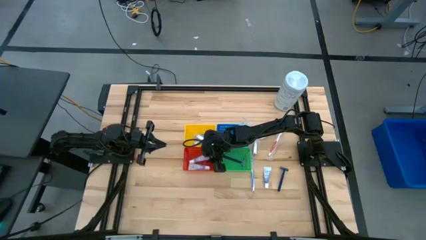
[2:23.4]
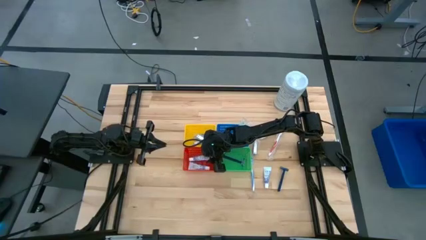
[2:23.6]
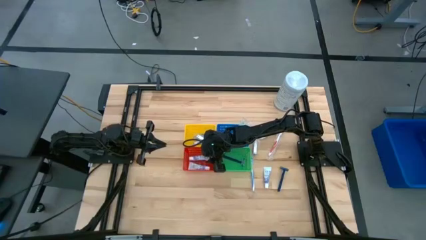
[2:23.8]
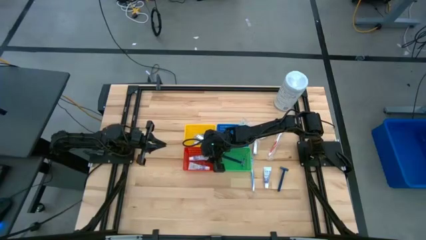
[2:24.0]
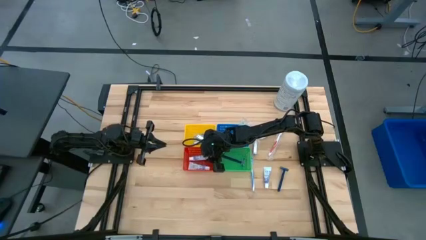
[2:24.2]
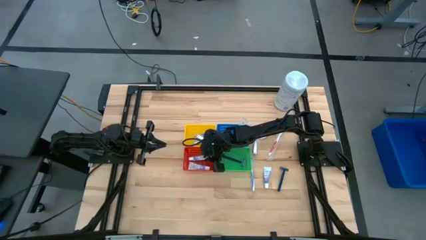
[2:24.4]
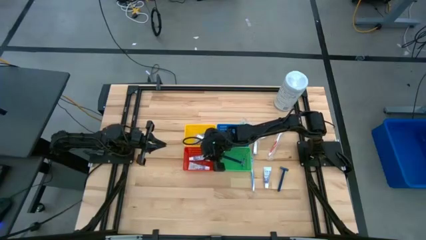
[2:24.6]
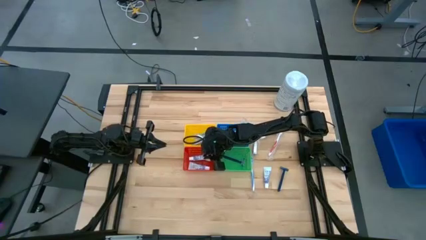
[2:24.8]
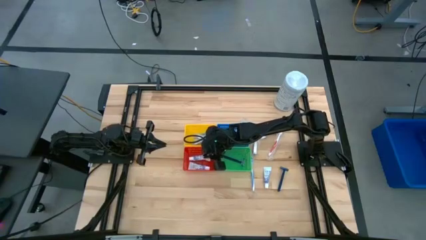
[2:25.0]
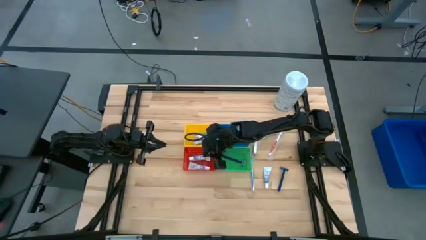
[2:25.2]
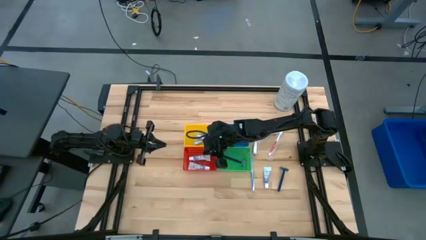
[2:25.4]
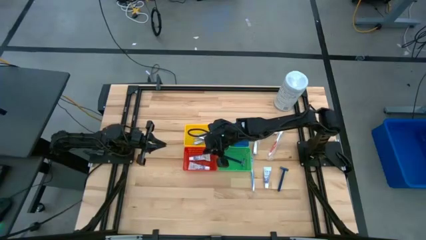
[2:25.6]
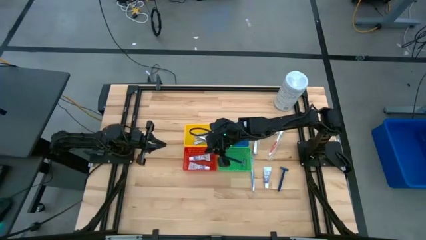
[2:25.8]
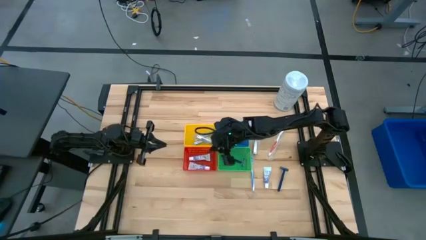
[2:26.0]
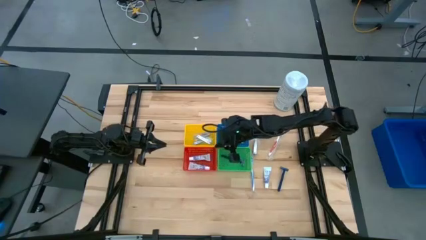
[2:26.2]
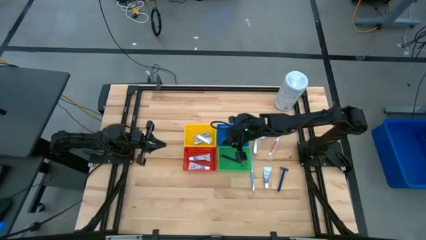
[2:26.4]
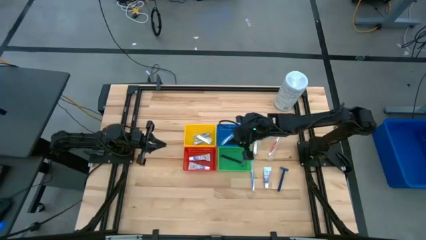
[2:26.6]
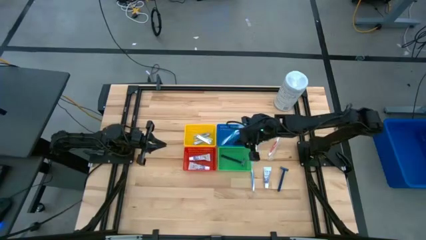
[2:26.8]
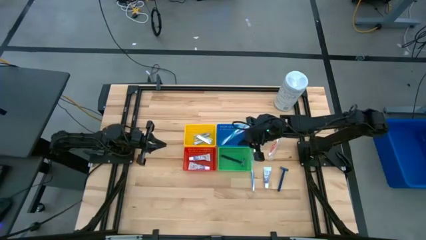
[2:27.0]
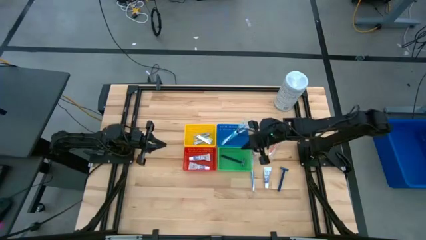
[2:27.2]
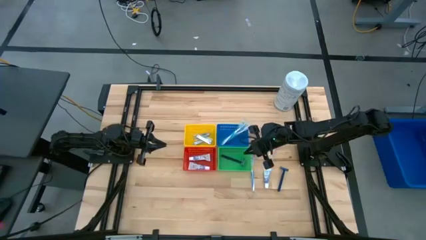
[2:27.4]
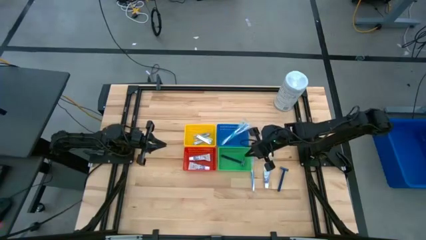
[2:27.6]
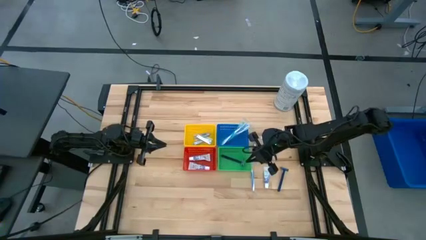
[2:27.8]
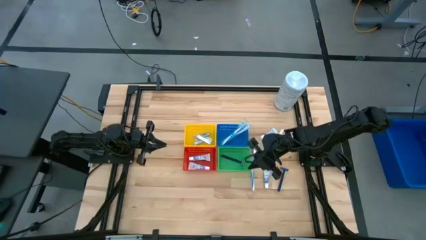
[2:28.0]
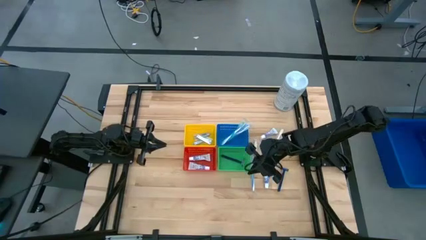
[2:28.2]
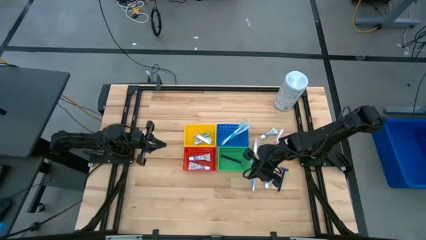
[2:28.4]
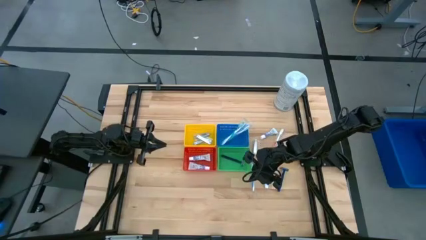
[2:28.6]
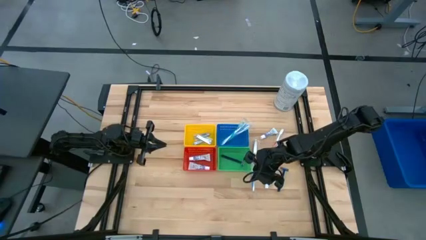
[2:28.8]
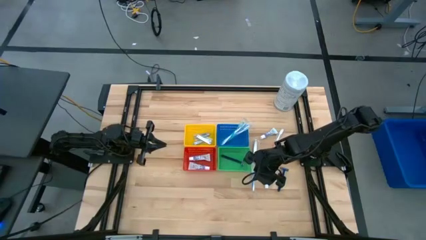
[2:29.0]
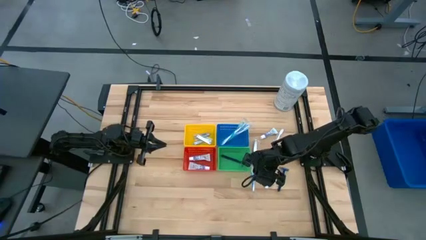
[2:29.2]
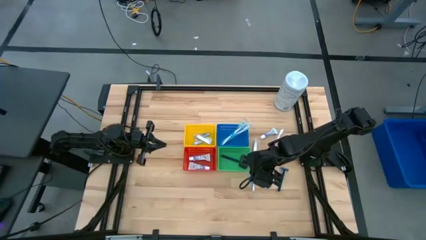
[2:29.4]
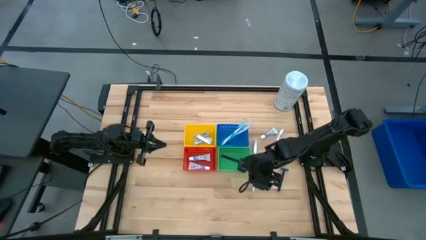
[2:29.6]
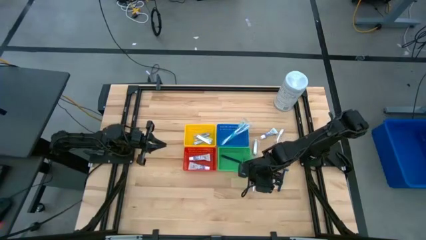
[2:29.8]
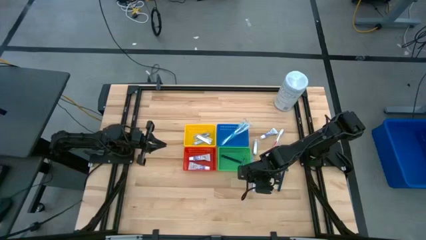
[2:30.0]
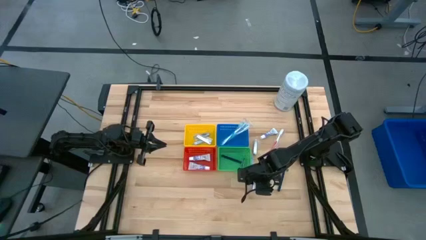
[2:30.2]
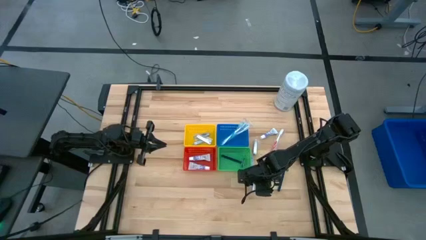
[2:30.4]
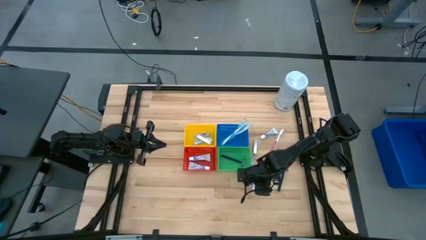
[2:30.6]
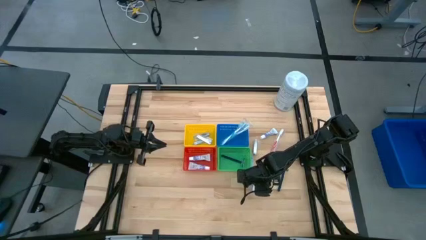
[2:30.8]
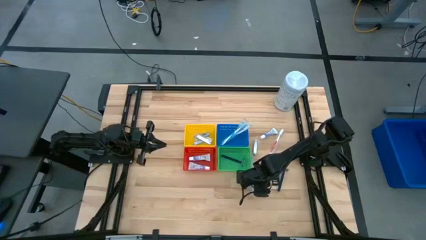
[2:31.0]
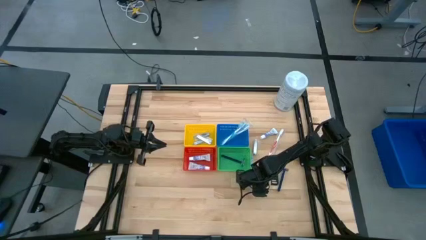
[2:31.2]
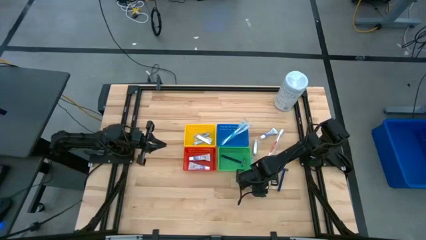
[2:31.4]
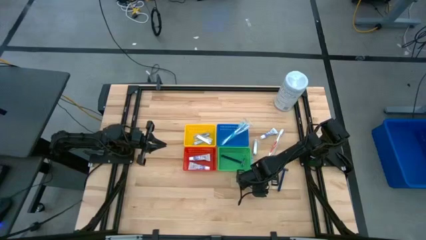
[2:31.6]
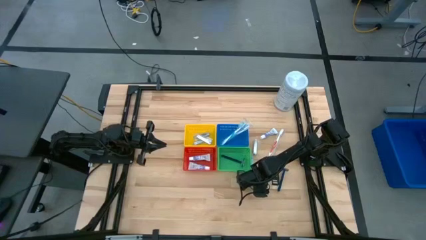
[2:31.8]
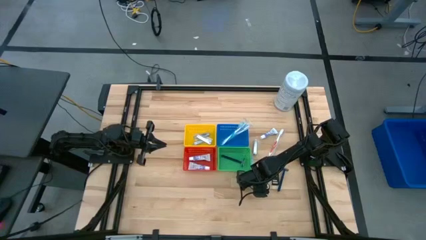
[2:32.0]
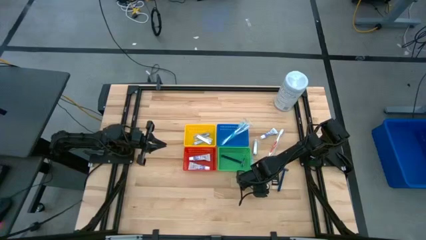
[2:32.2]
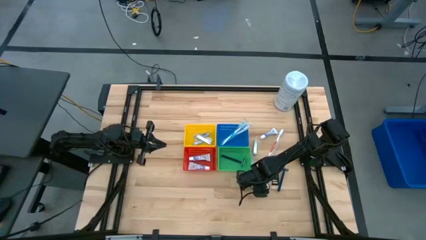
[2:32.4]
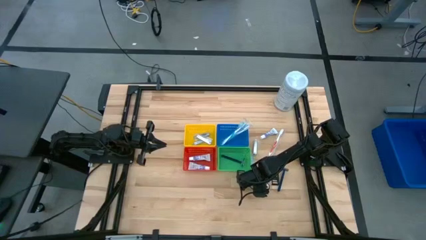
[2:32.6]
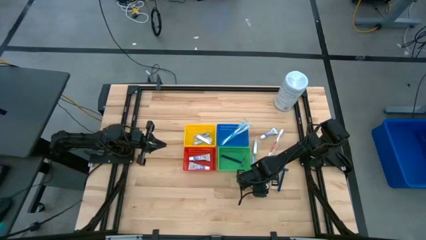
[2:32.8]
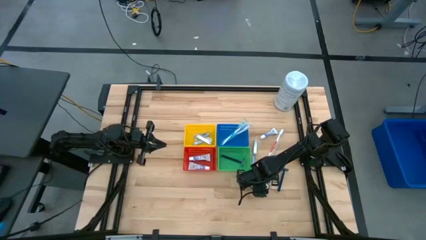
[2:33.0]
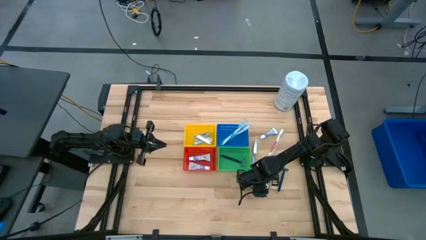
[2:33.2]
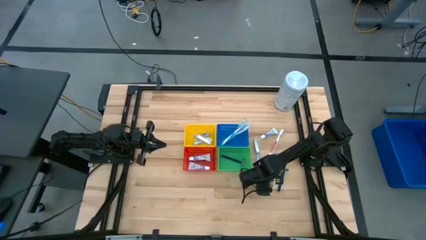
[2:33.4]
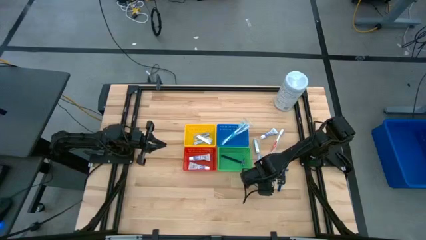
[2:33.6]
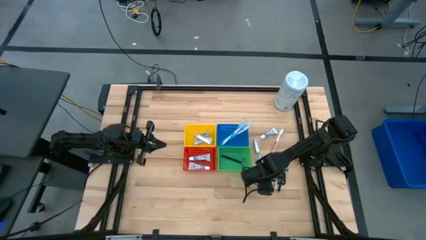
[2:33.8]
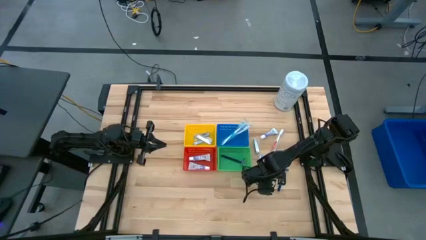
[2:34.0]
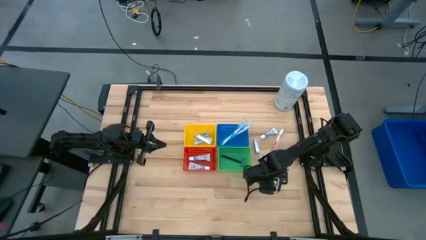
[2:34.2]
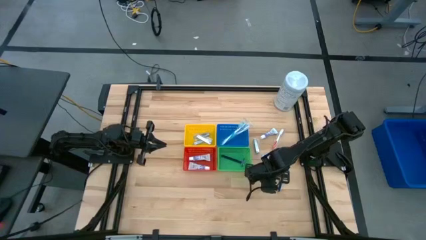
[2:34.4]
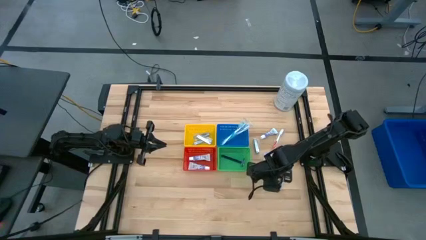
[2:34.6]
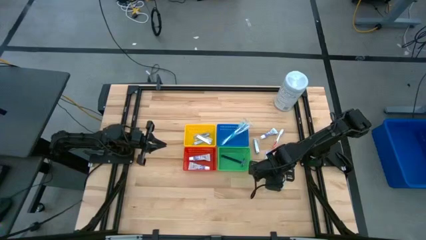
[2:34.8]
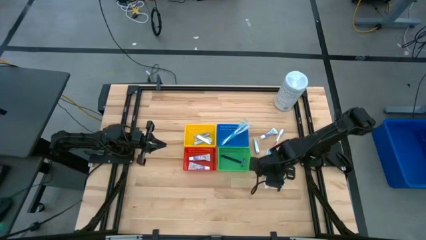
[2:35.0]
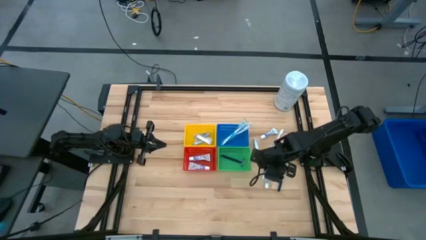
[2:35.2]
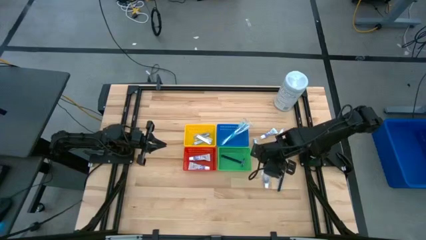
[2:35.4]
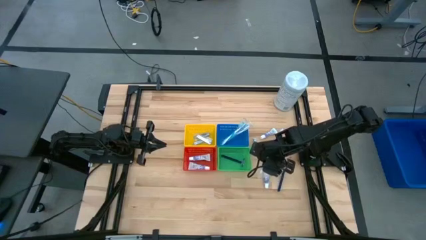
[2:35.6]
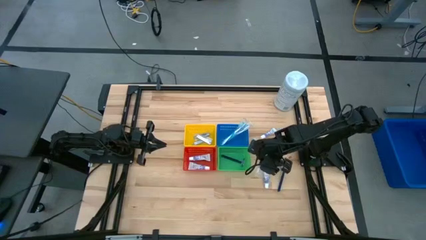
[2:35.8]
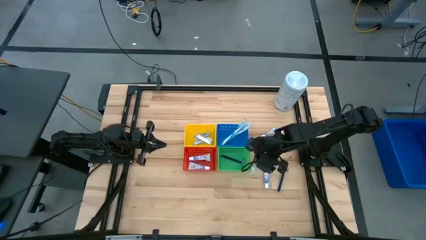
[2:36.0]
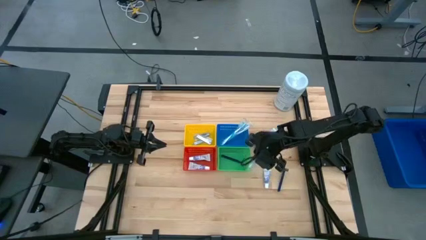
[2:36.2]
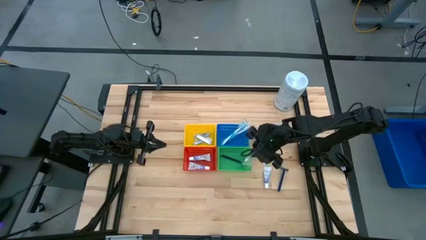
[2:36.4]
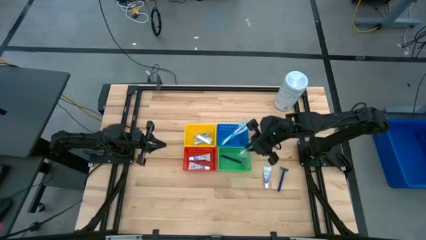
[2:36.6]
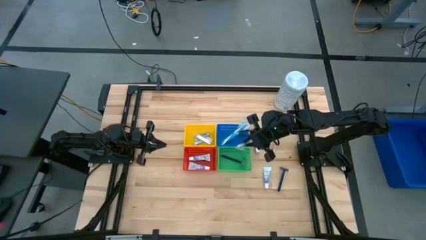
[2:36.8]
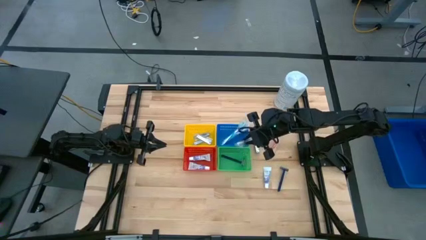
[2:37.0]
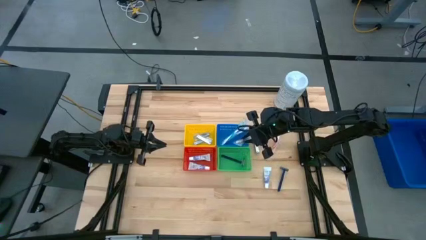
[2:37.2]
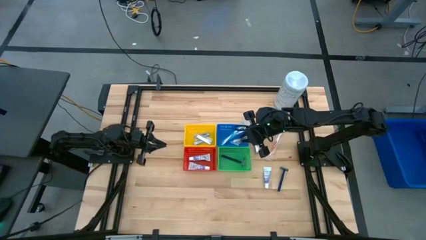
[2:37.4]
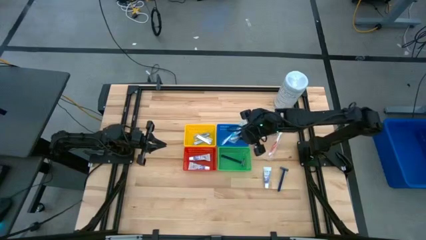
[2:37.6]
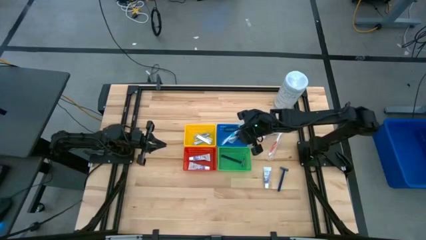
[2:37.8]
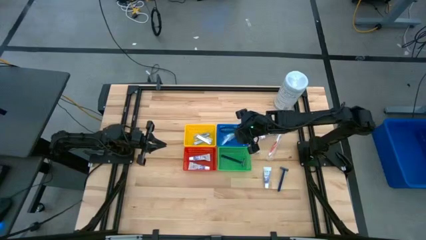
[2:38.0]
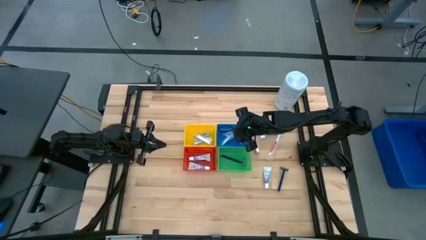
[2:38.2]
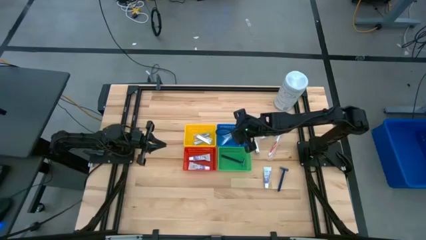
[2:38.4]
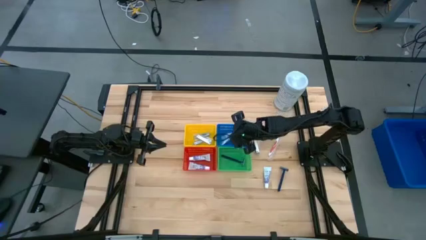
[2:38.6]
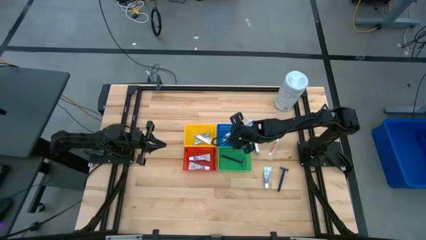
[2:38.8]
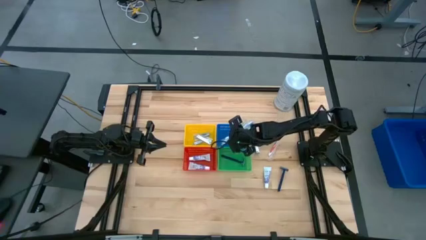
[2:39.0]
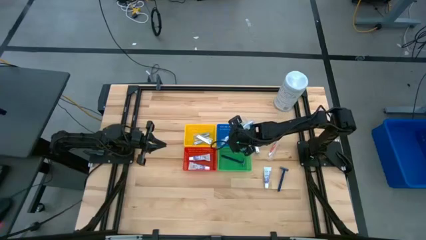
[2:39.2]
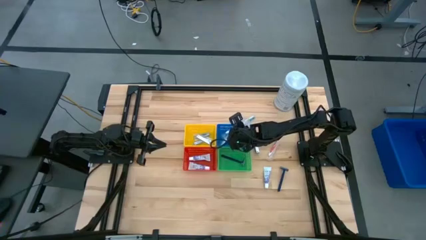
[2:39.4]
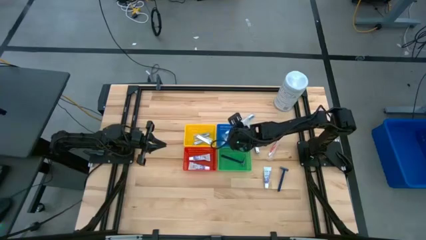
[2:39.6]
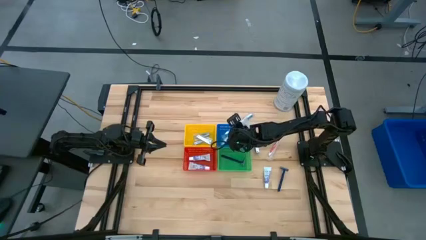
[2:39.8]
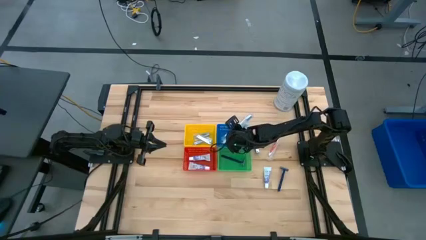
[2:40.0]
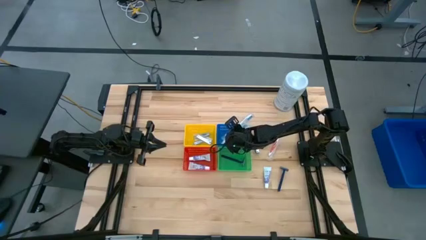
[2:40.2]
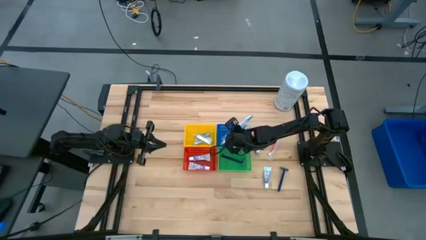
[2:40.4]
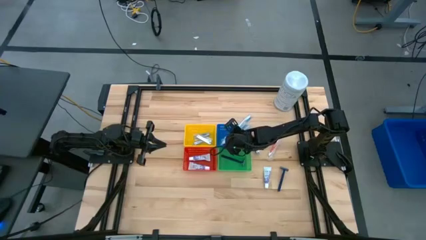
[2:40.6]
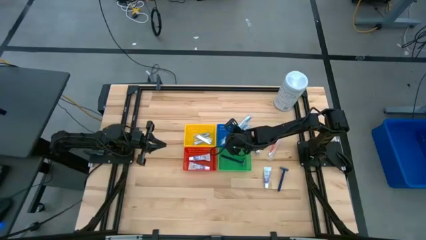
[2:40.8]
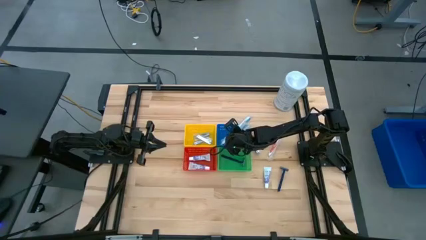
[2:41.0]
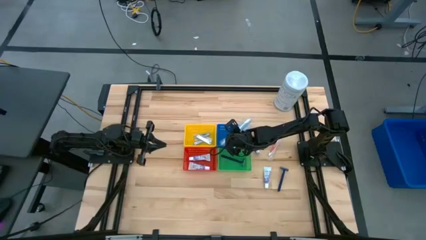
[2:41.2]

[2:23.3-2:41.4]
Task: Pick & Place Travel size toiletries
Put the blue toothbrush into the blue bin
